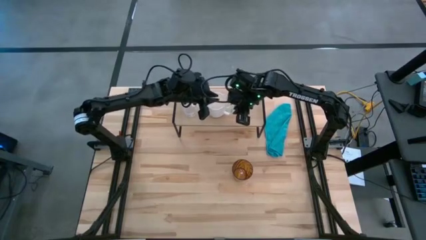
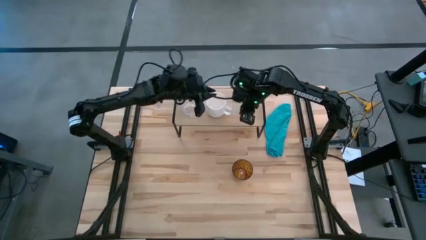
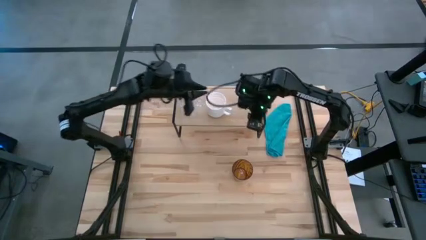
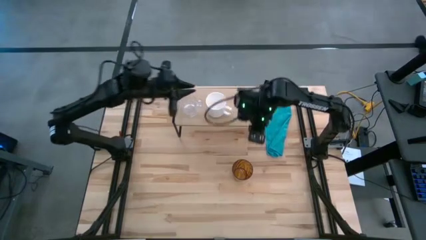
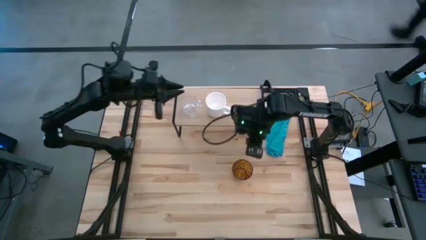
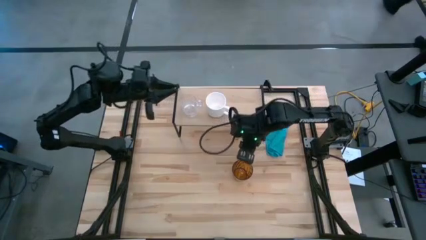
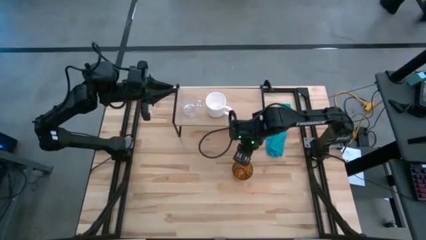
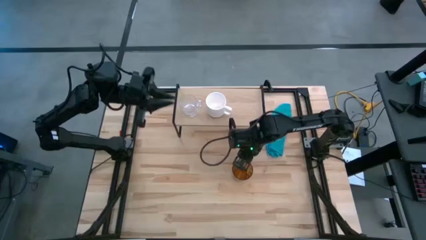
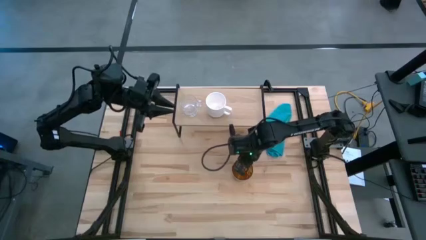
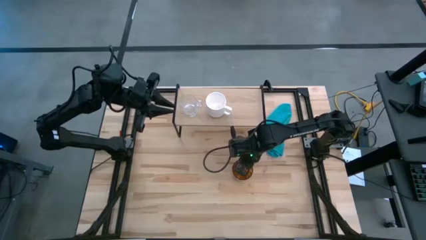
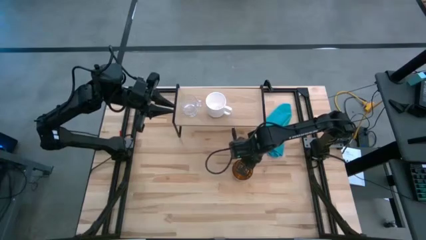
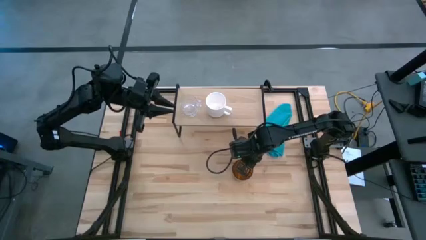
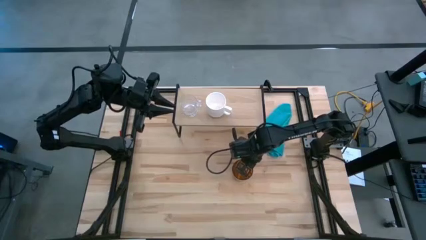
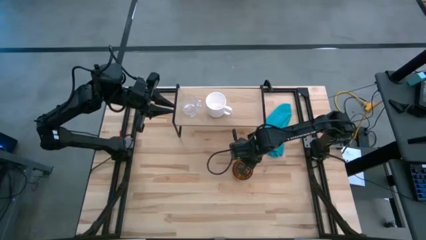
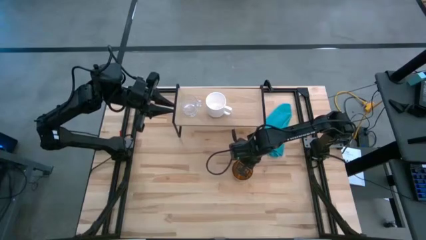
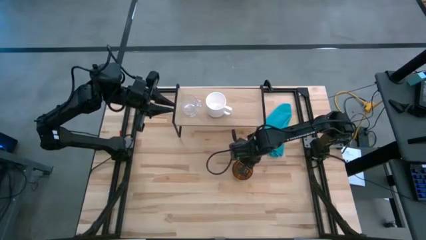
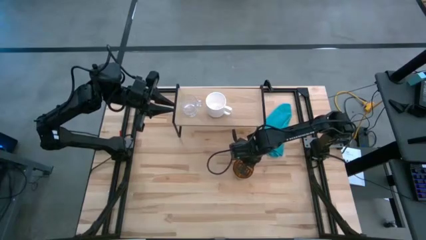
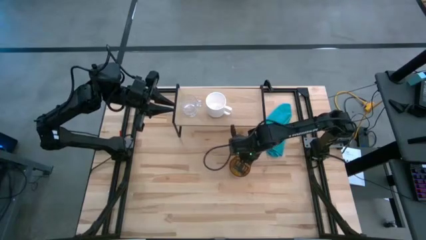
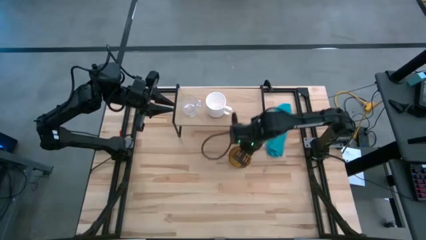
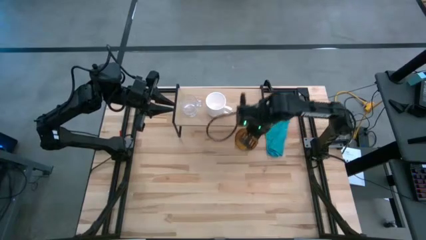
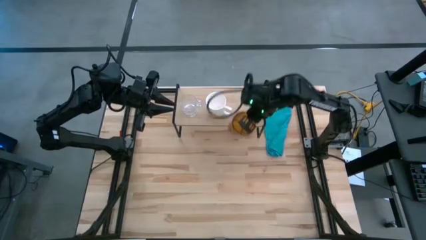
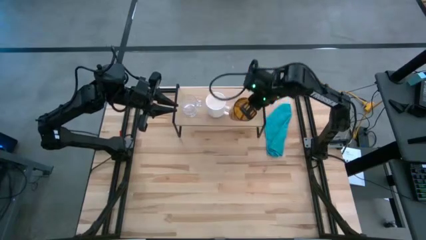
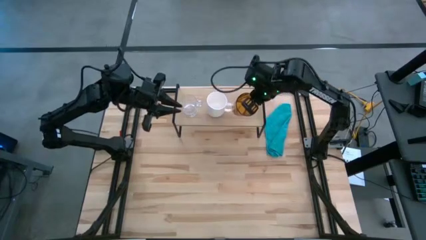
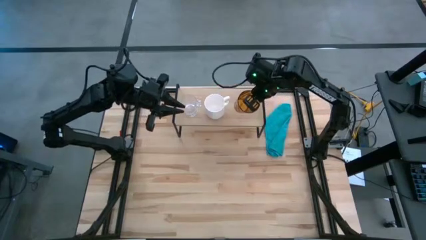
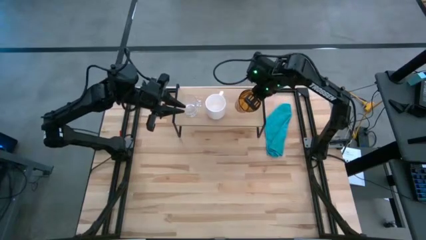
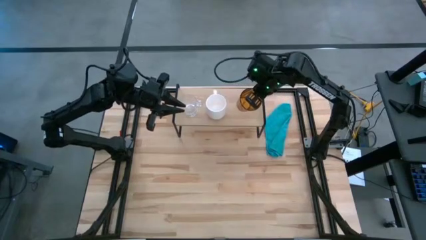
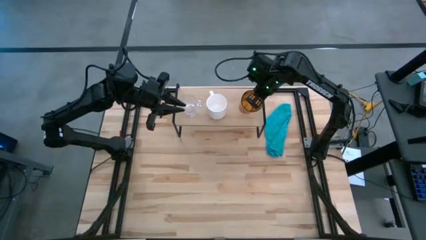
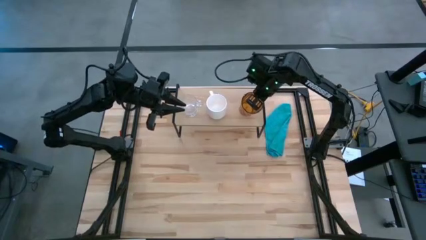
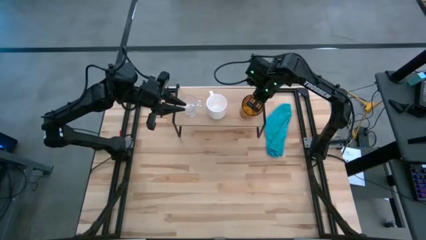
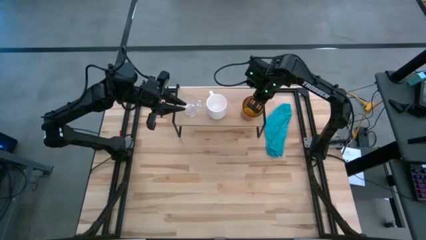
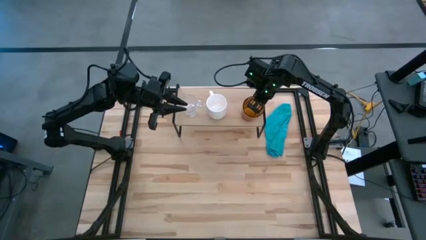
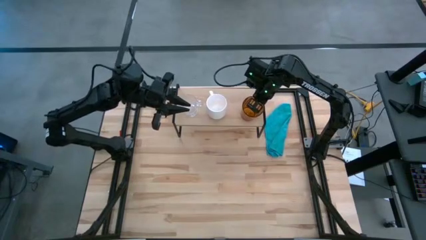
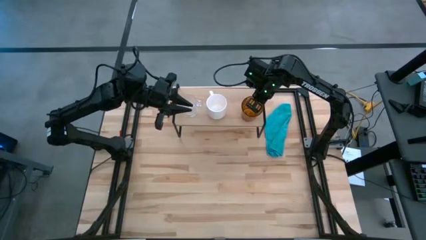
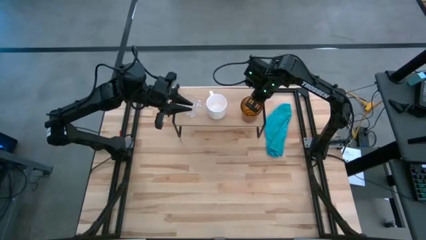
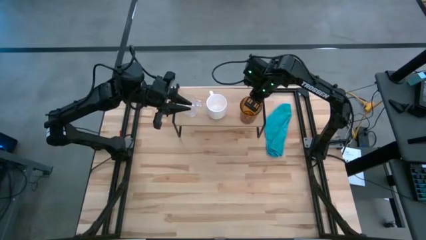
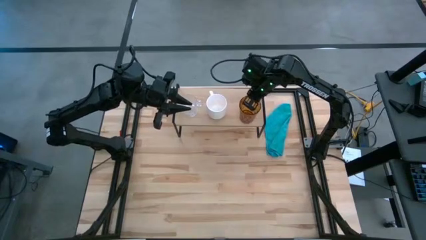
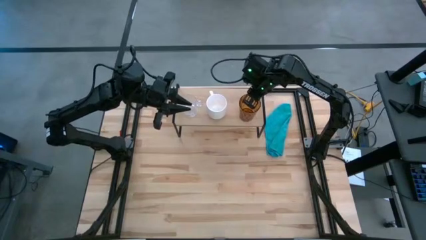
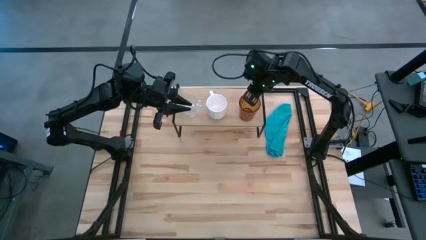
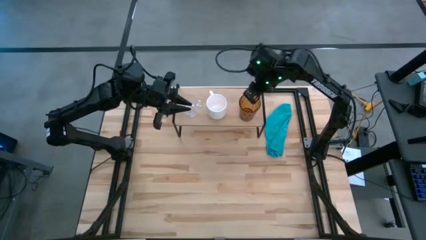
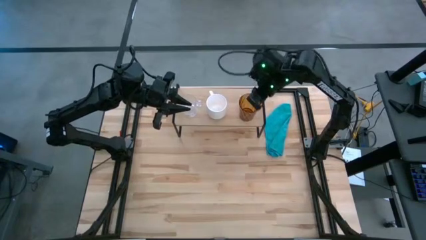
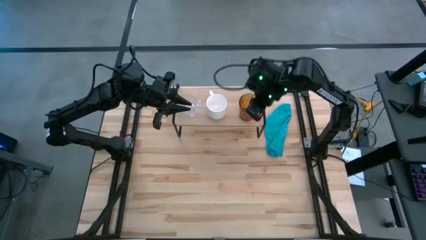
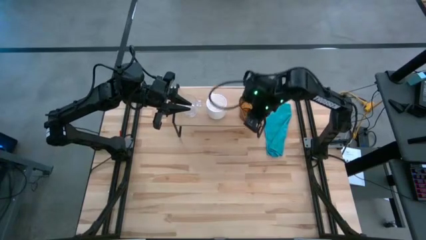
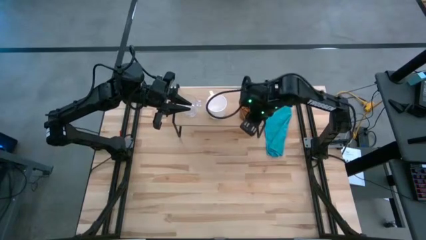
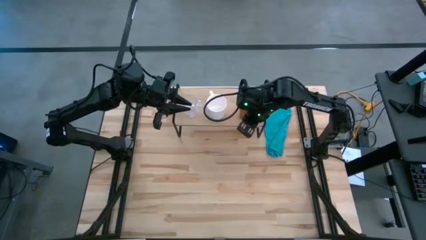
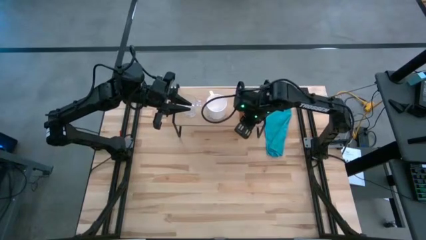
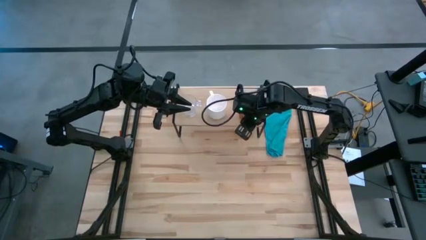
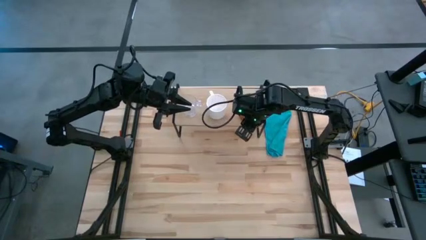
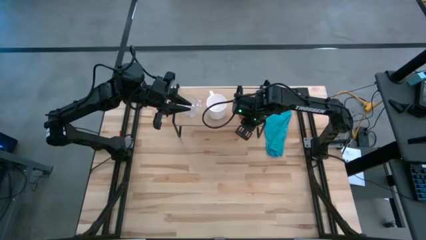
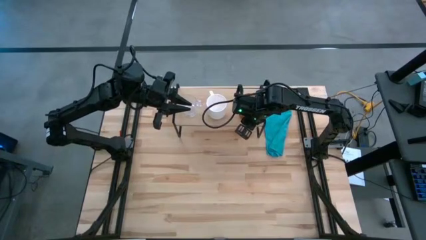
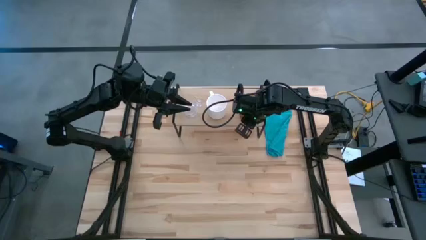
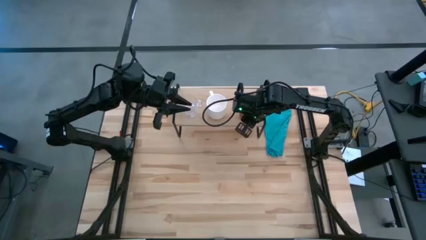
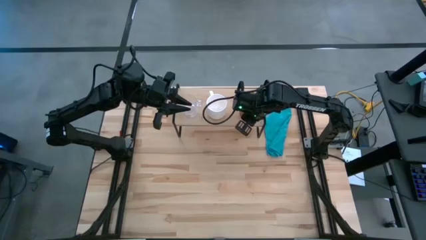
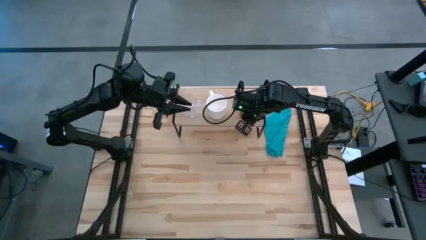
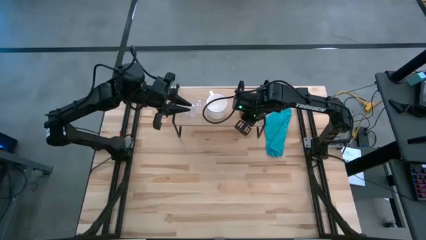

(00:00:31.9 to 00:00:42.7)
Task: Stack small to large cups/mugs on shelf
Put the yellow glass cup on the shelf

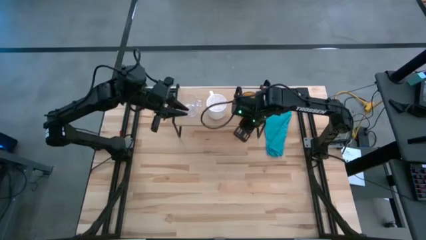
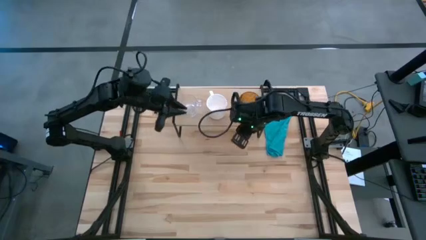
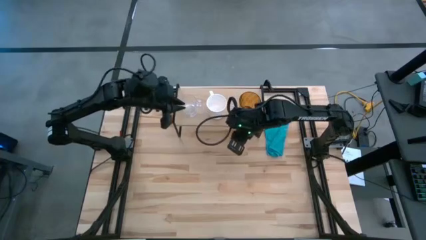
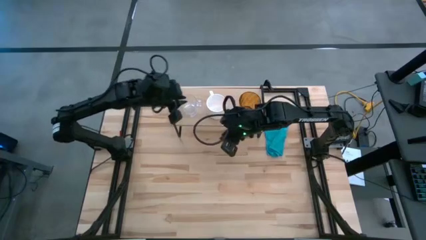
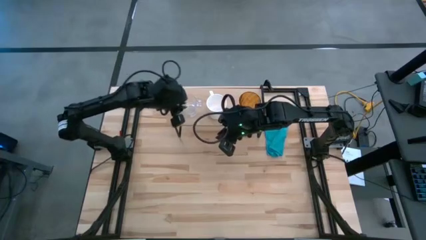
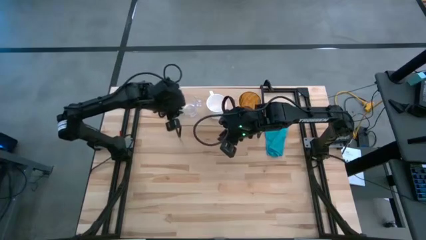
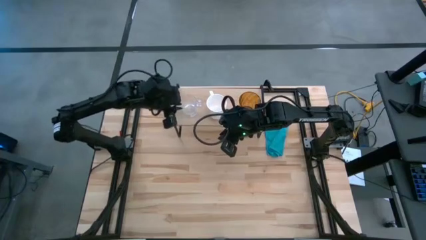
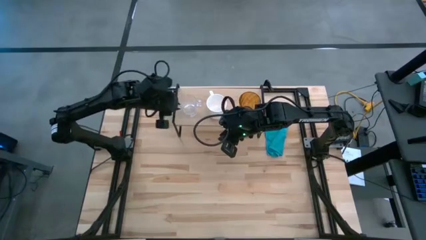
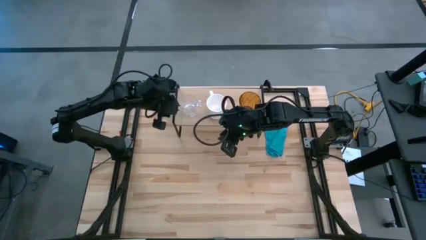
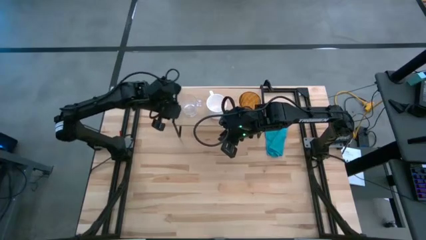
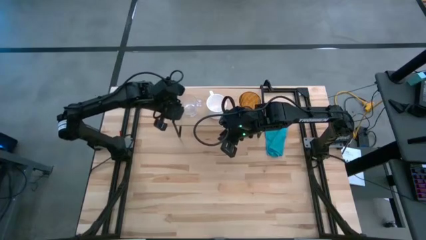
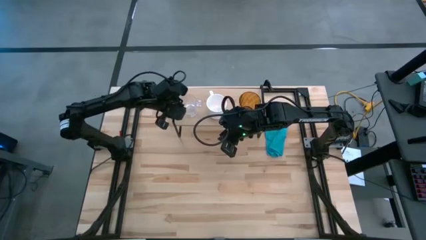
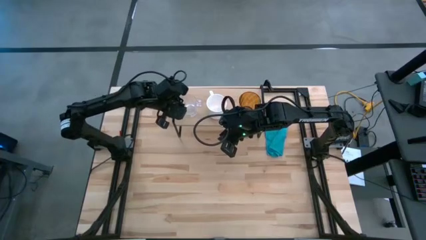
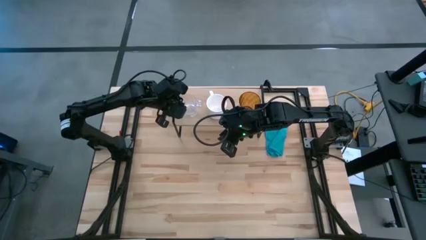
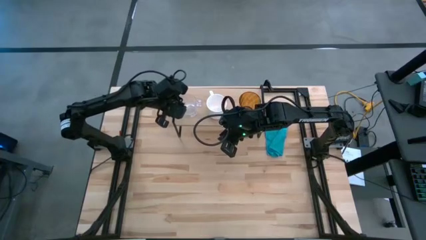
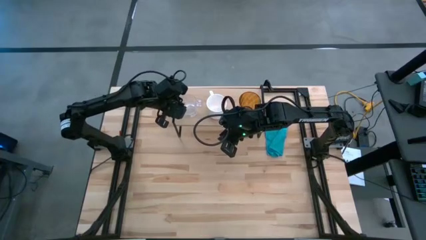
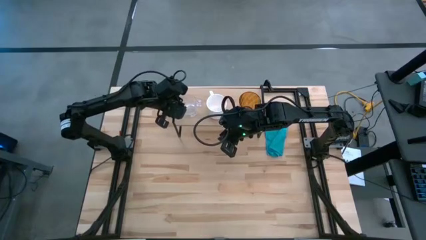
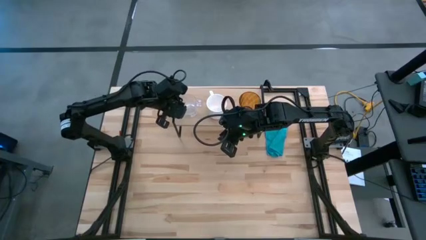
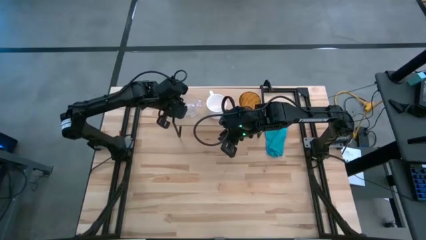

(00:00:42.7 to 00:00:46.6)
Adjust the transparent mug on the shelf
